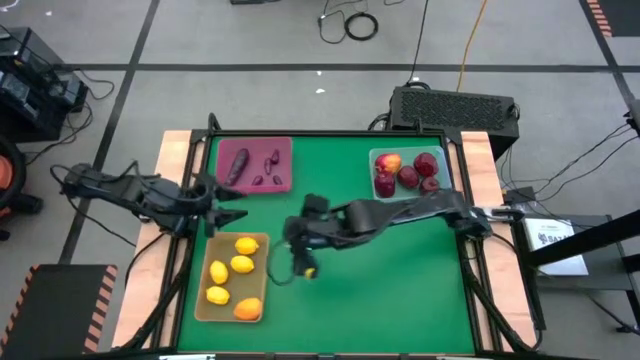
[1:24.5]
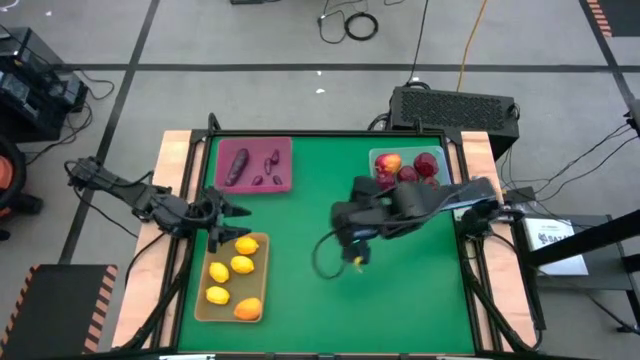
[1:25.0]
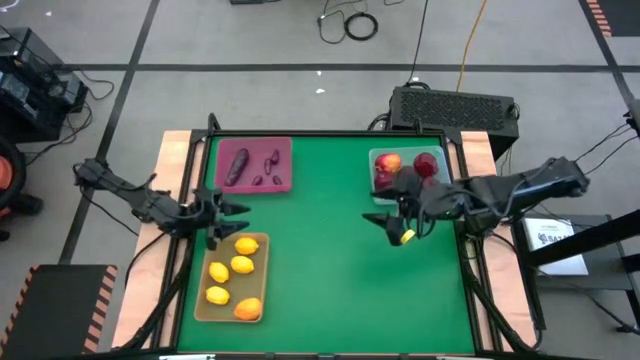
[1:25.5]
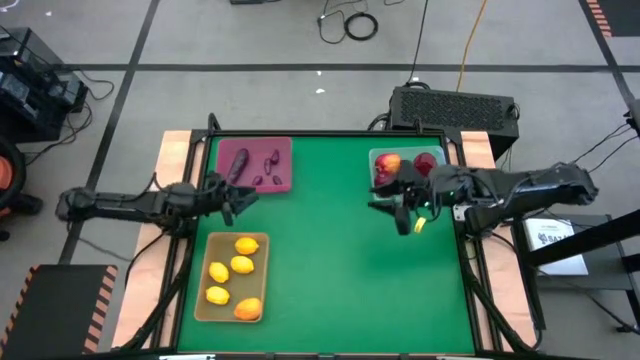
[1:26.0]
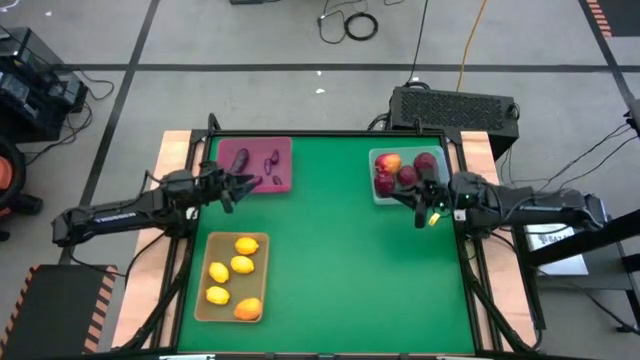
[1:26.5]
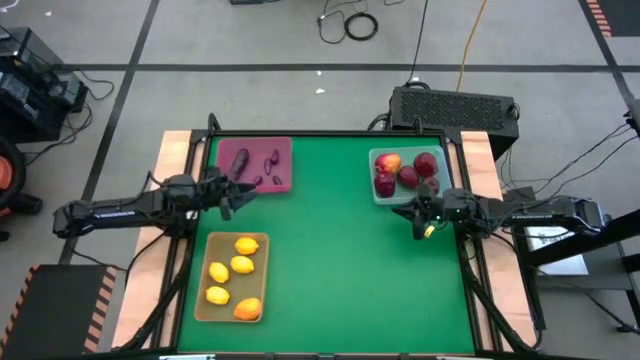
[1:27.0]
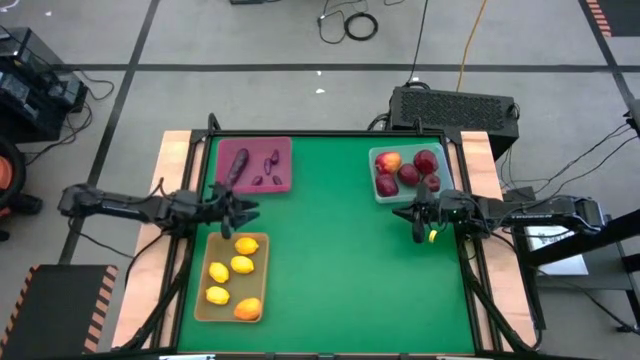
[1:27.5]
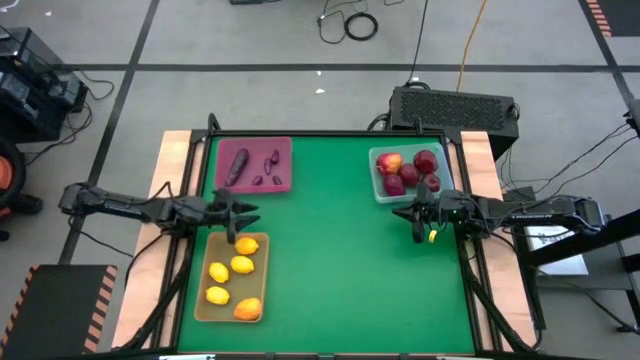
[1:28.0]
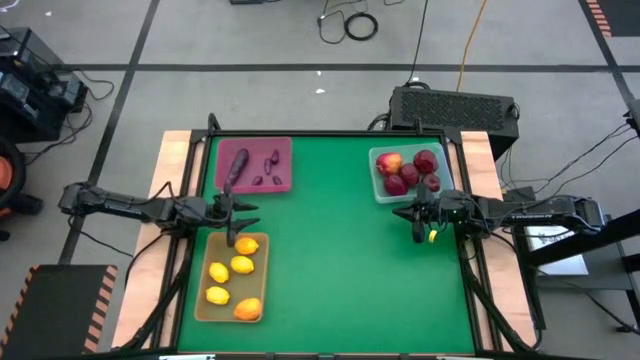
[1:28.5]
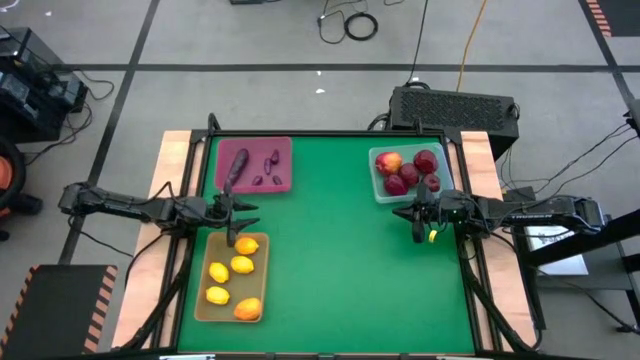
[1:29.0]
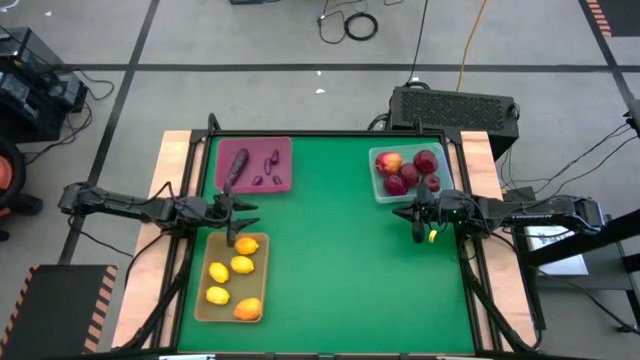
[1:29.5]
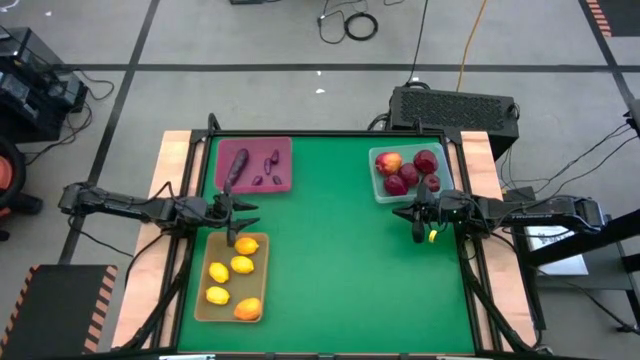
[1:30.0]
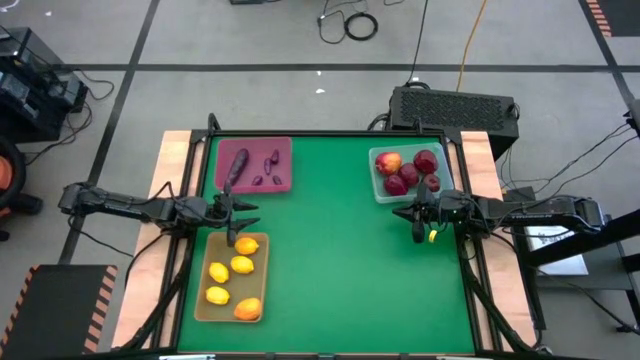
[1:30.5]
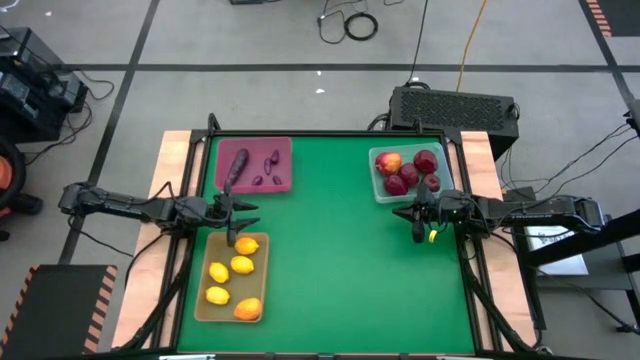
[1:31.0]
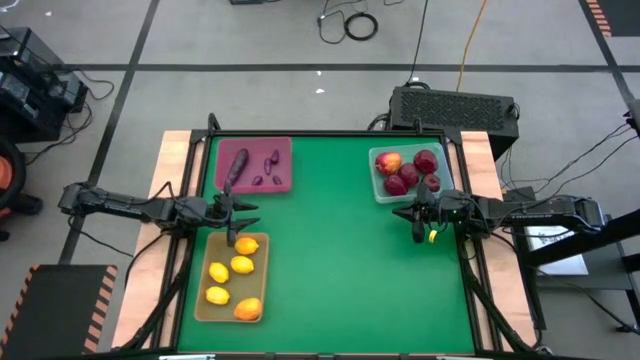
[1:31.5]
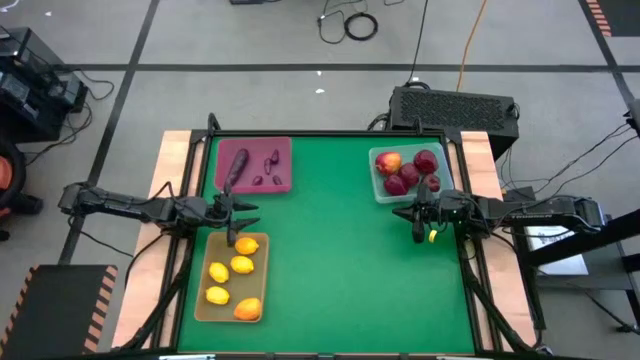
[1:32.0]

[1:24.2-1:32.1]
Task: Sort produce into baskets
Return to Home Position

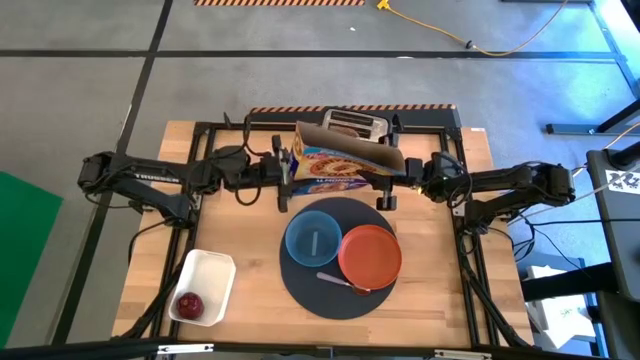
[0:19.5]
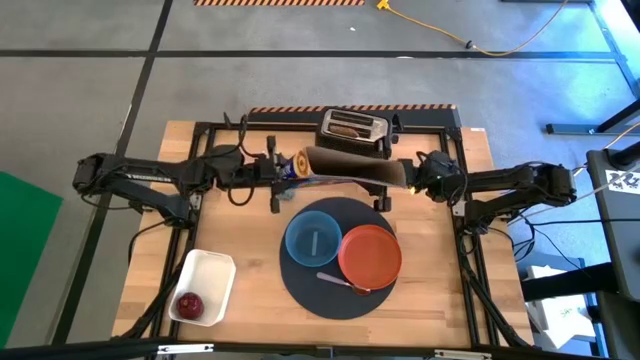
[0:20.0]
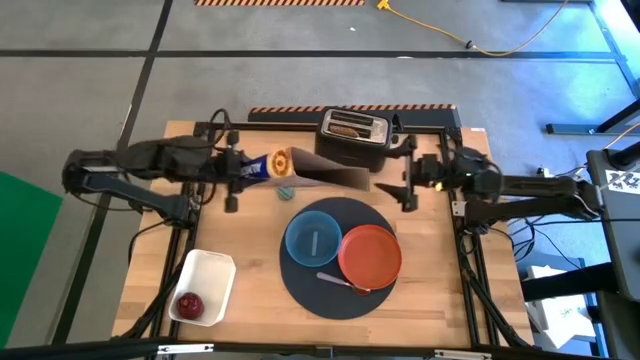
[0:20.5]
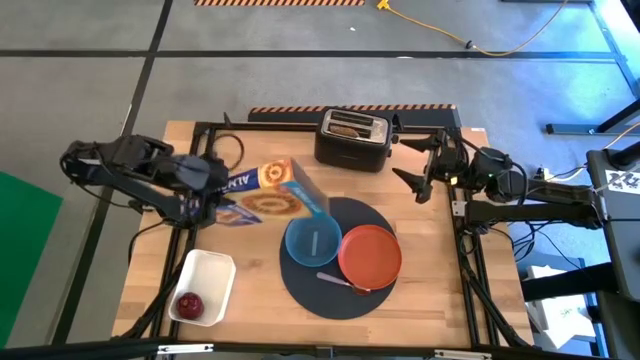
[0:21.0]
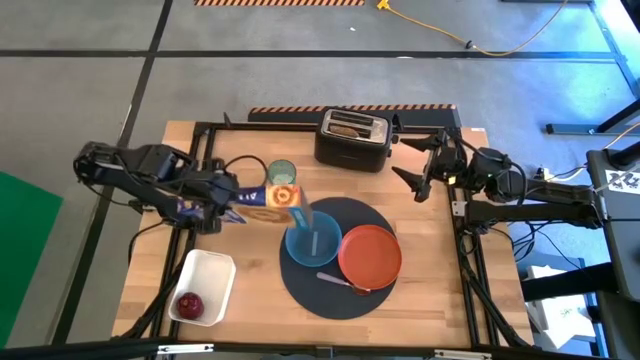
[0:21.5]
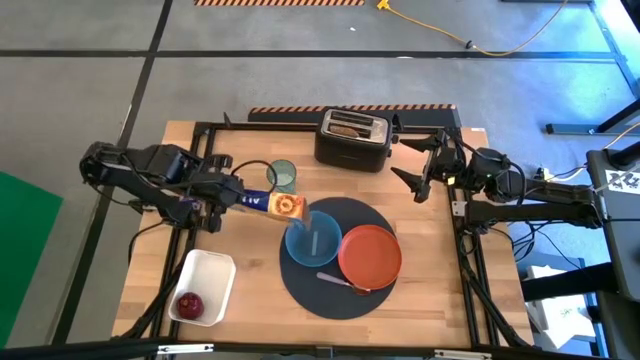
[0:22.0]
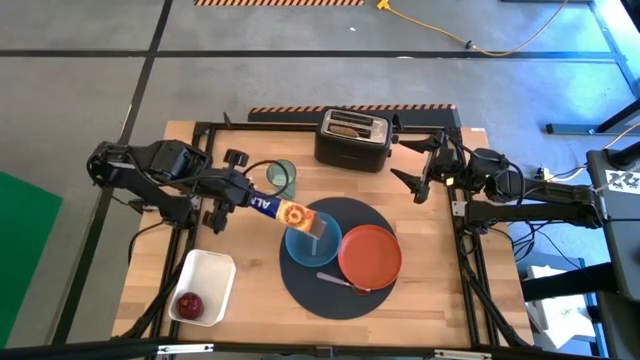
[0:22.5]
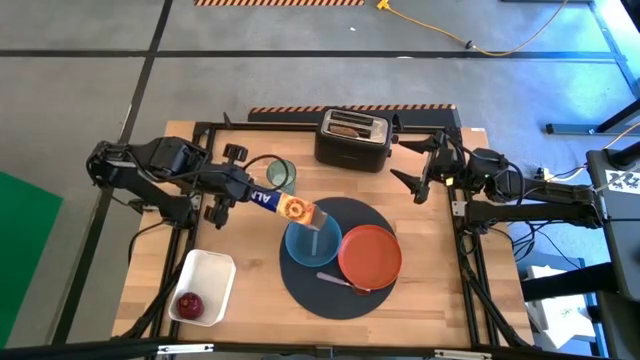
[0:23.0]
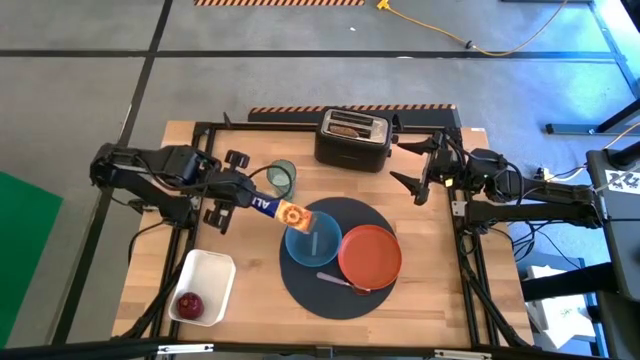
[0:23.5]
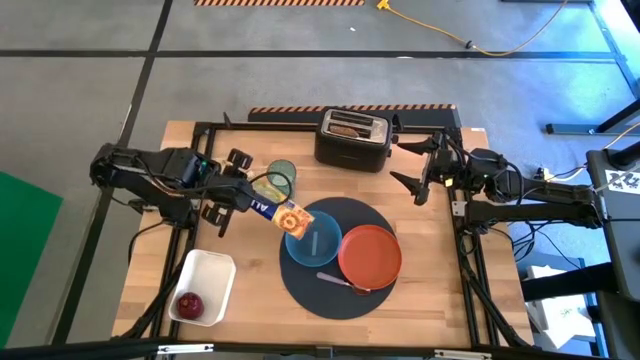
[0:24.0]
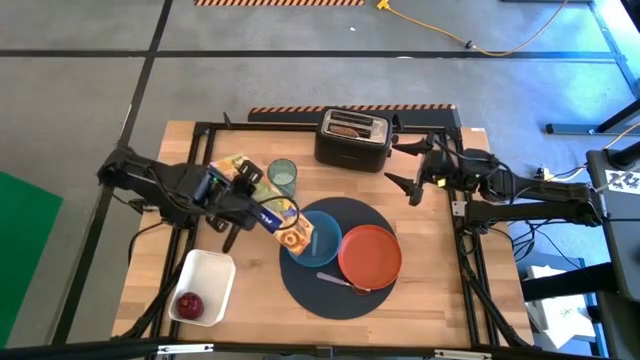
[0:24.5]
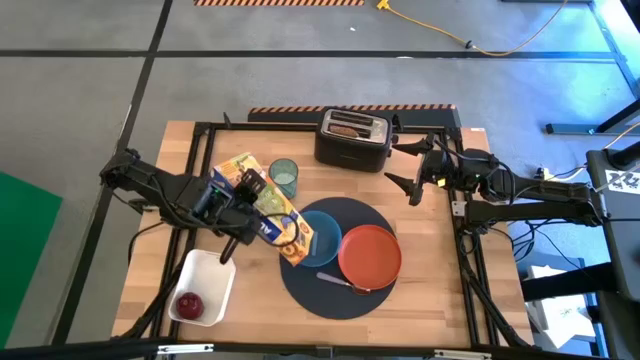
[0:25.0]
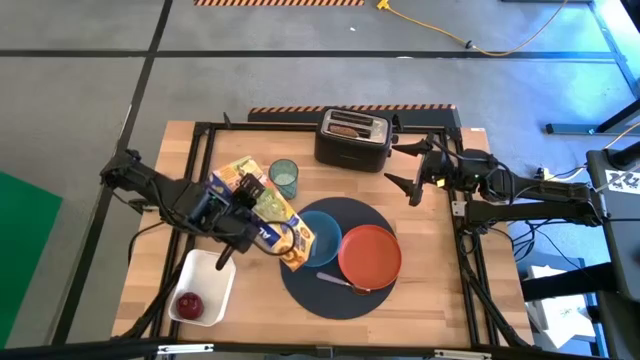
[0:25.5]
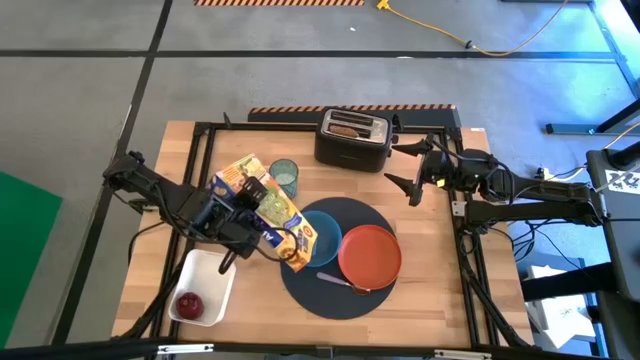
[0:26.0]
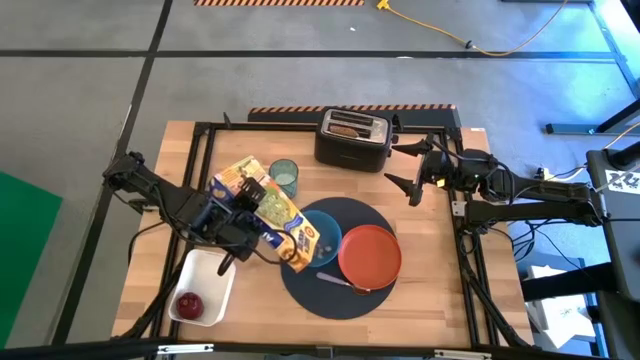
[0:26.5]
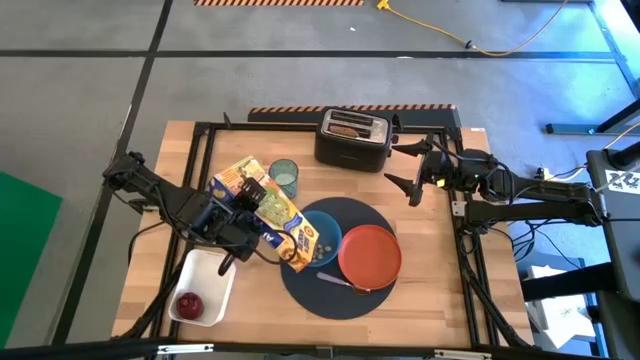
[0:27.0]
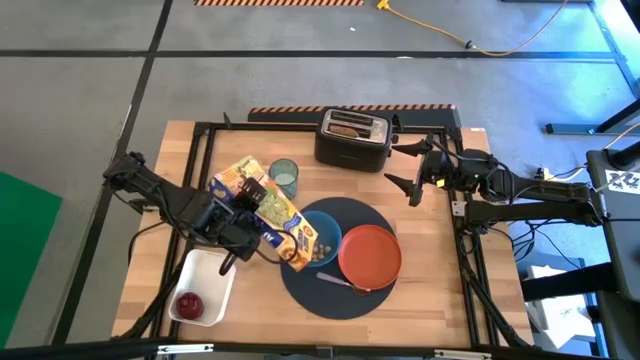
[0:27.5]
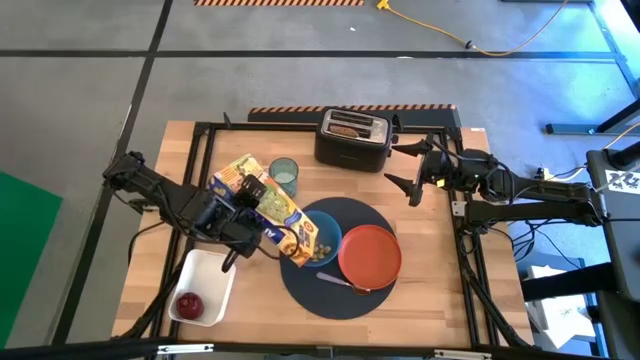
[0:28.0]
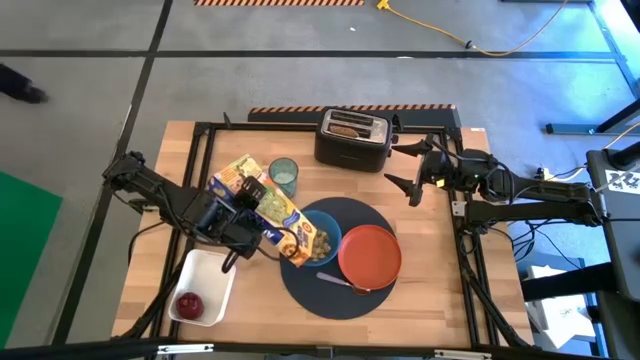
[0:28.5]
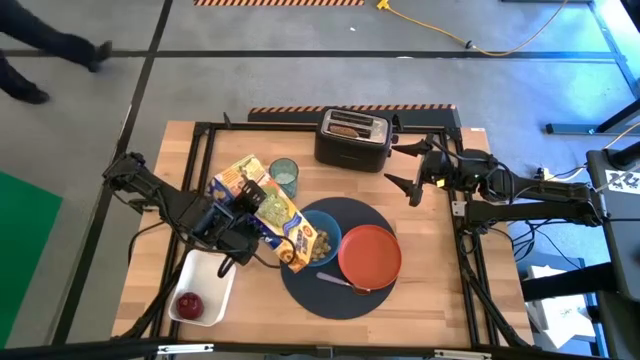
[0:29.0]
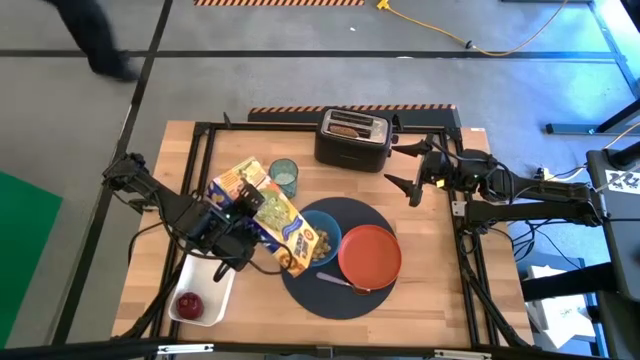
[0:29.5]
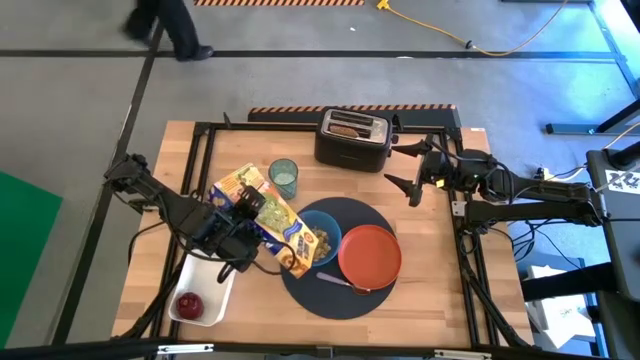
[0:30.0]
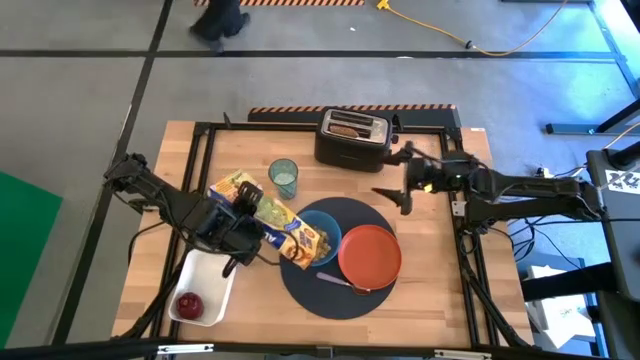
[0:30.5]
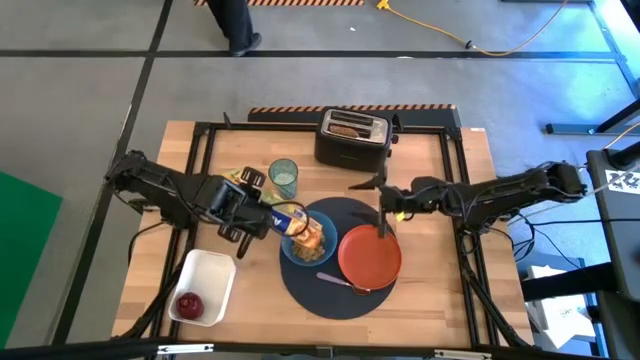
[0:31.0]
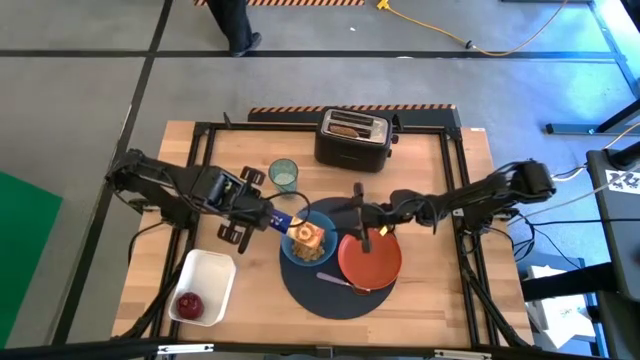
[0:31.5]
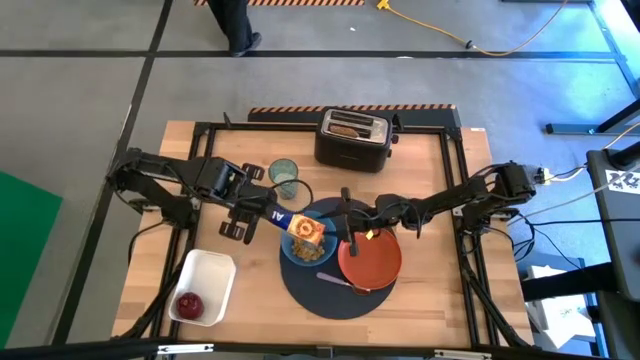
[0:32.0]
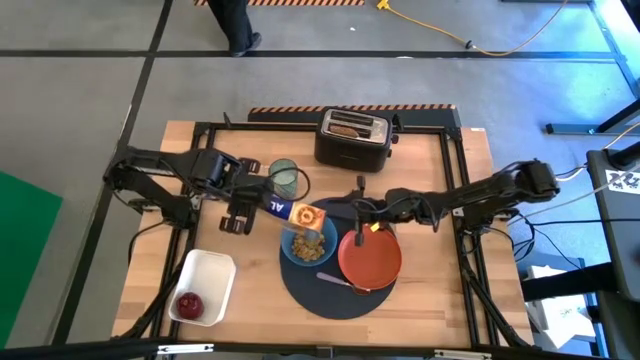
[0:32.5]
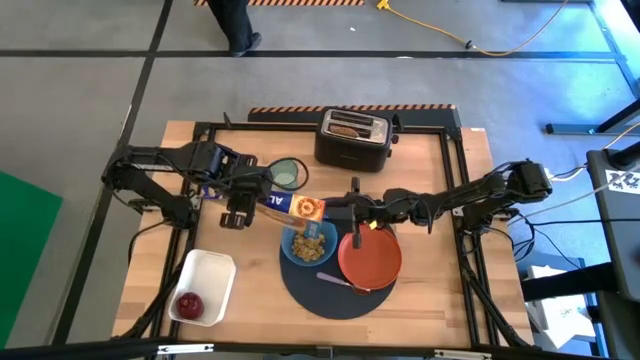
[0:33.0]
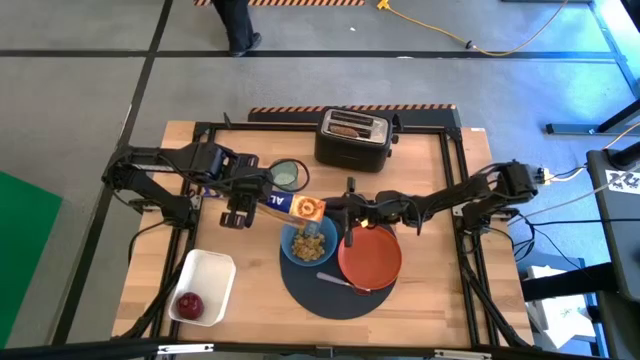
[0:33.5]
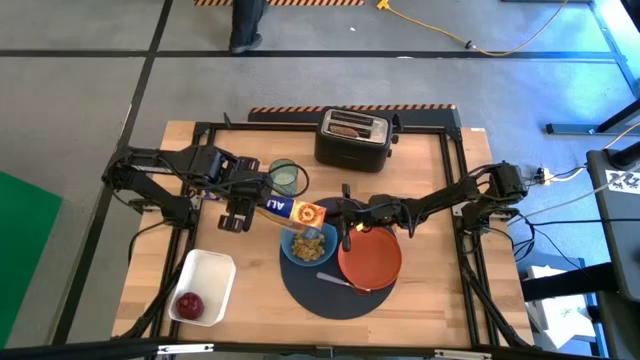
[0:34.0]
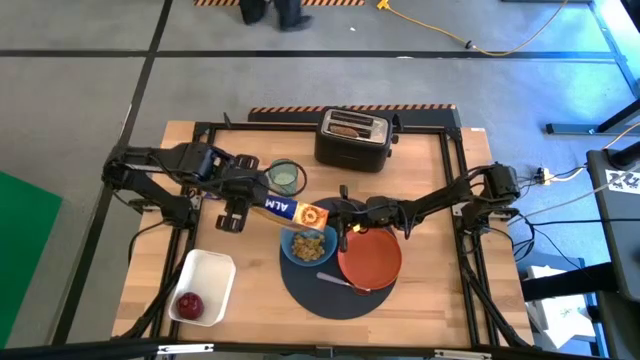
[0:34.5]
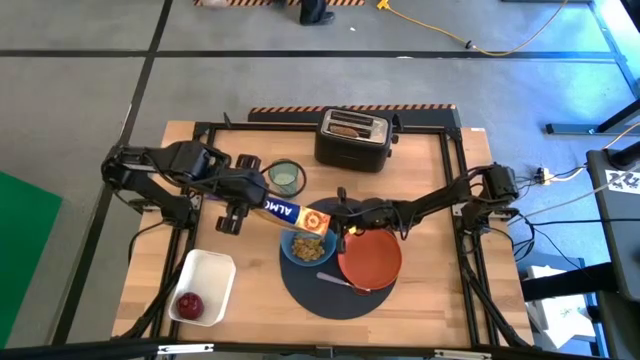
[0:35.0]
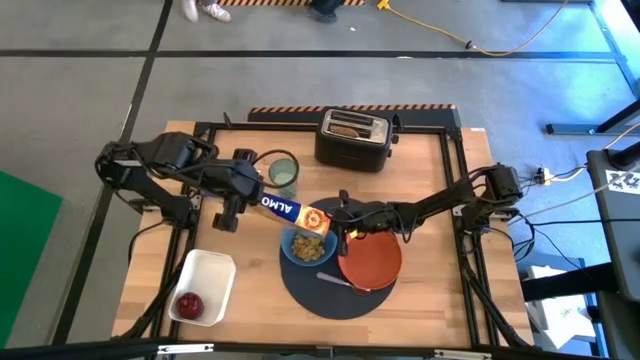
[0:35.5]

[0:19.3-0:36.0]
Task: Arrange a breakfast setting
Pour the cereal from the cereal box into the blue bowl
